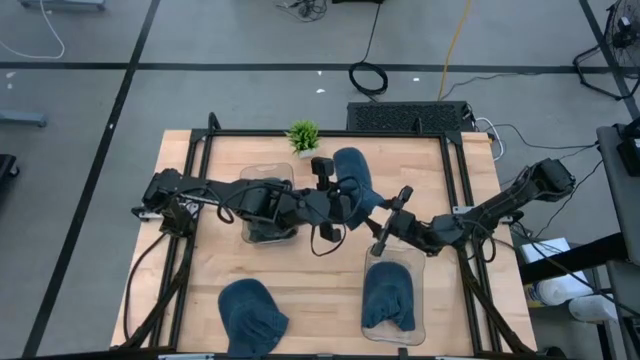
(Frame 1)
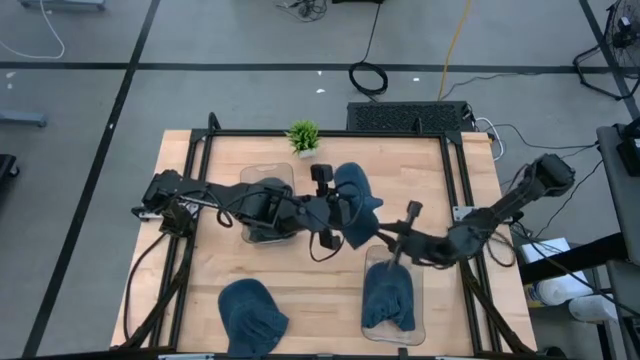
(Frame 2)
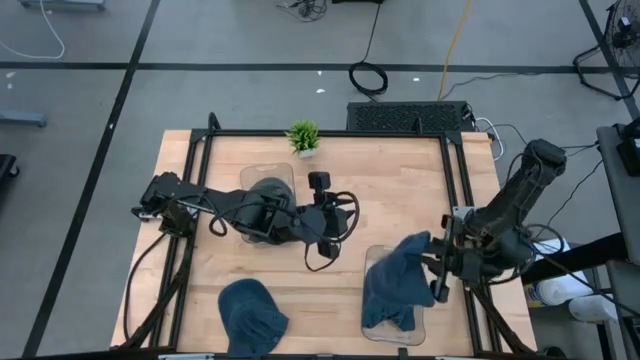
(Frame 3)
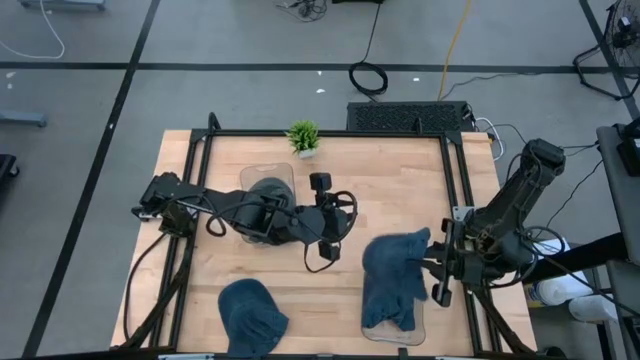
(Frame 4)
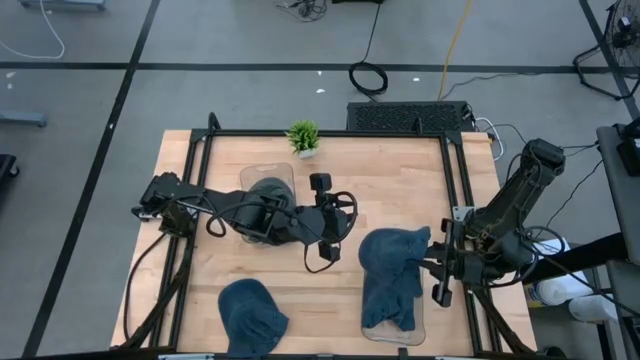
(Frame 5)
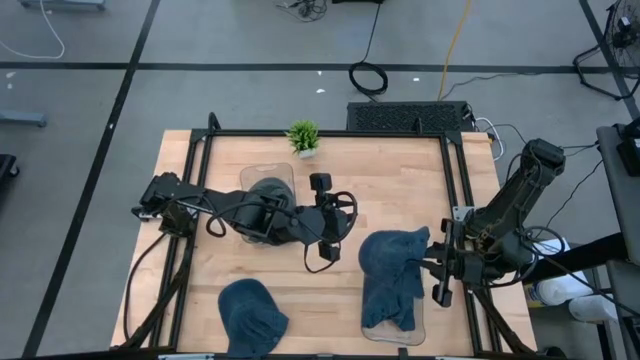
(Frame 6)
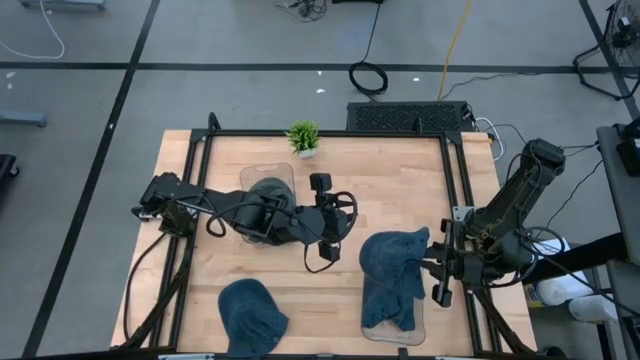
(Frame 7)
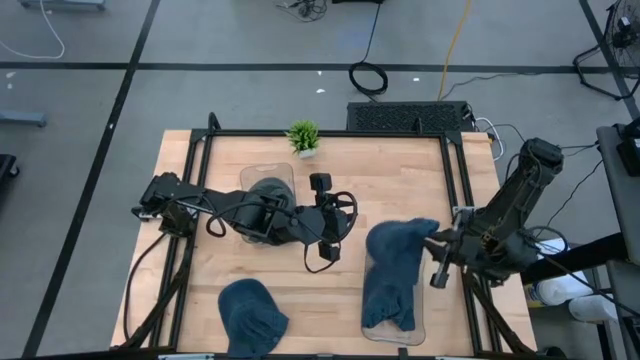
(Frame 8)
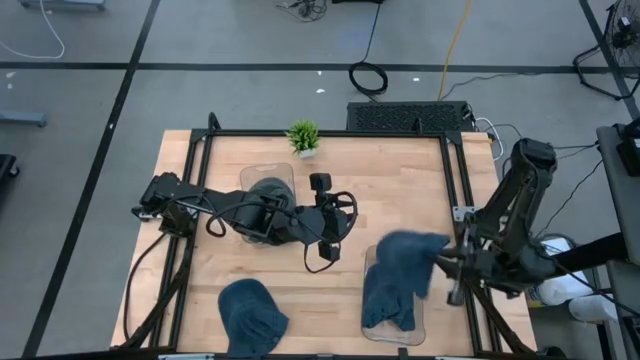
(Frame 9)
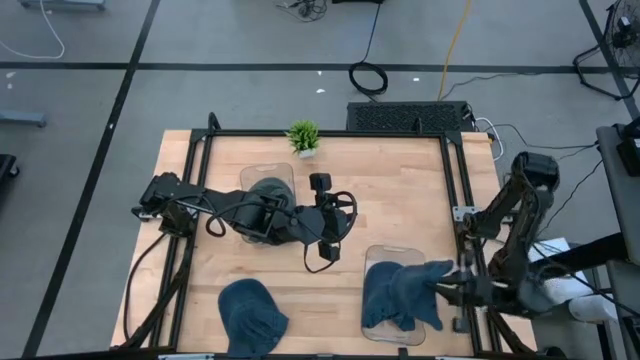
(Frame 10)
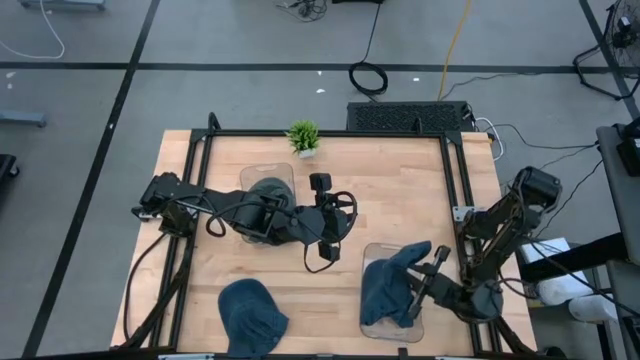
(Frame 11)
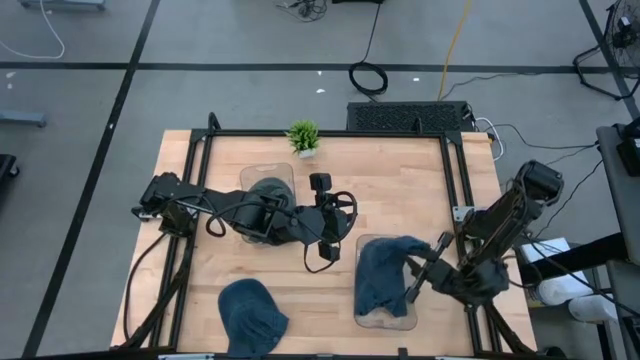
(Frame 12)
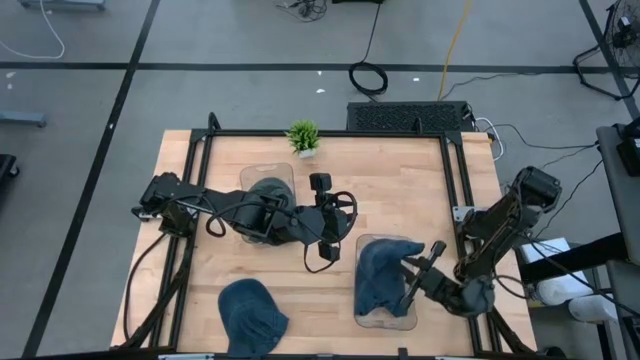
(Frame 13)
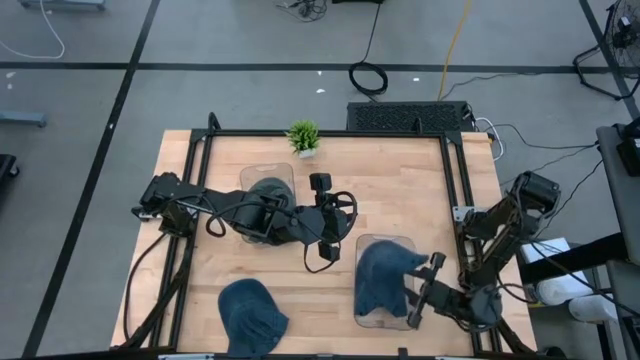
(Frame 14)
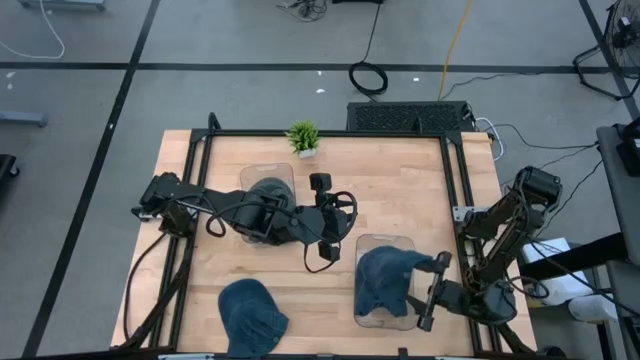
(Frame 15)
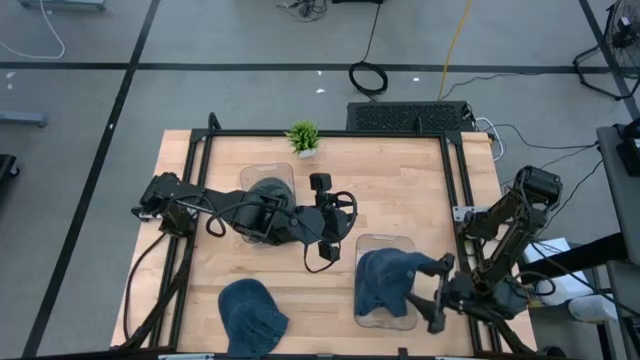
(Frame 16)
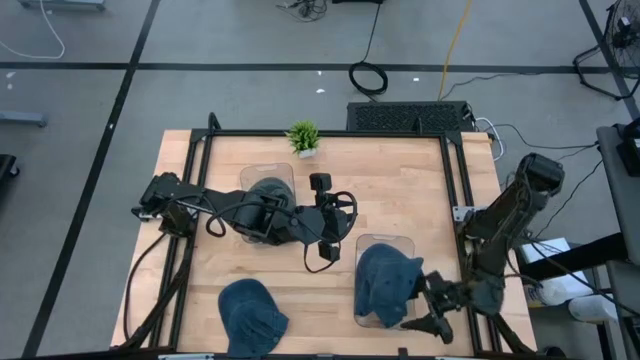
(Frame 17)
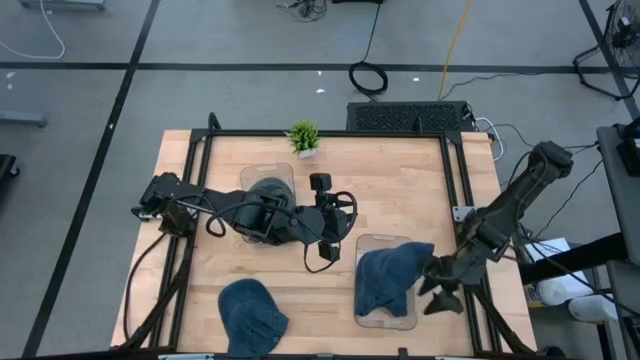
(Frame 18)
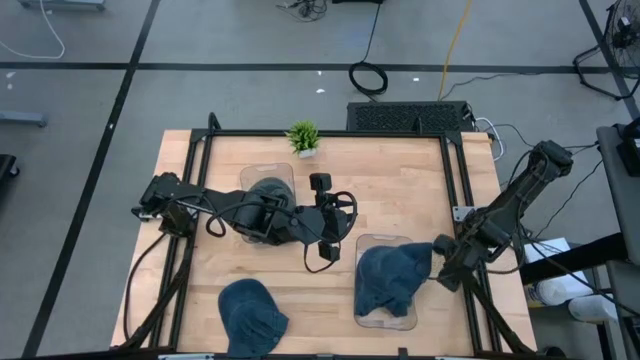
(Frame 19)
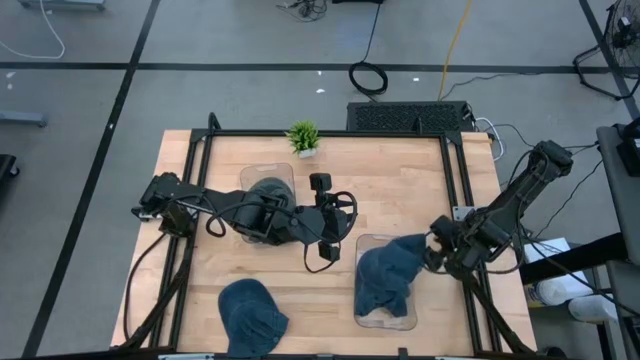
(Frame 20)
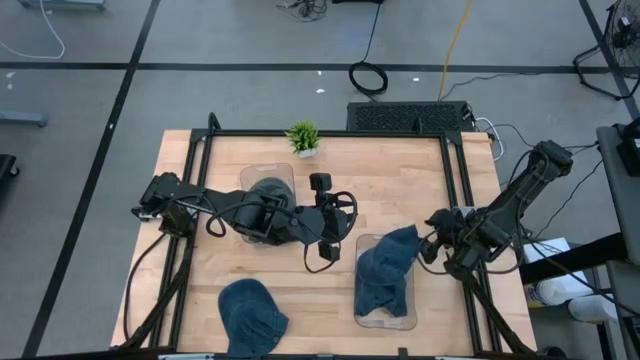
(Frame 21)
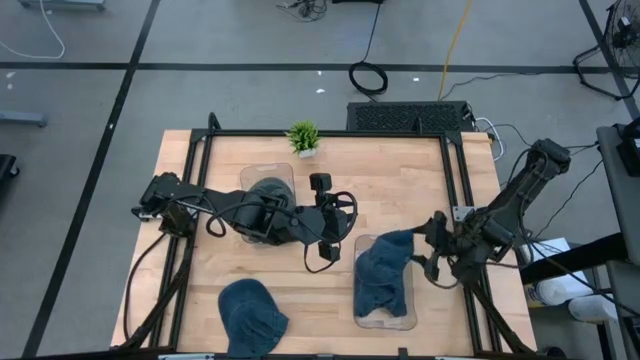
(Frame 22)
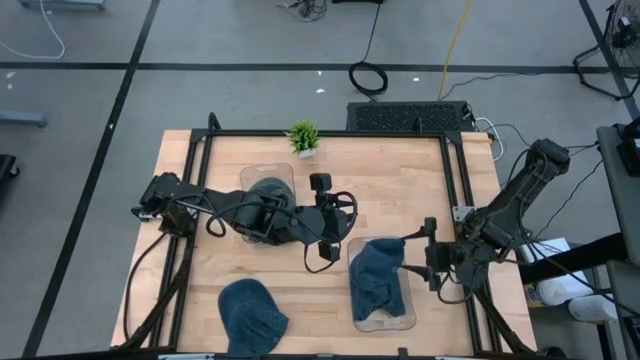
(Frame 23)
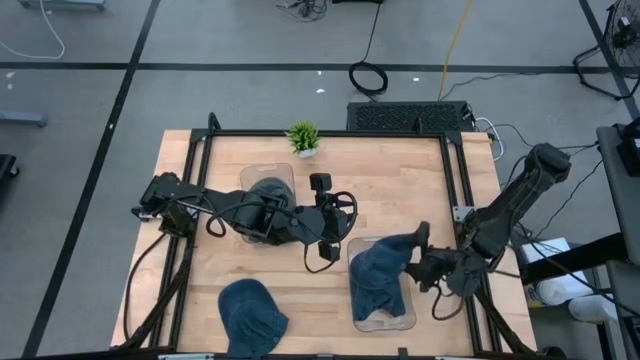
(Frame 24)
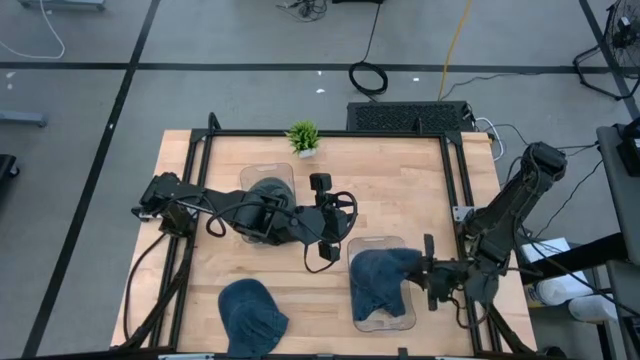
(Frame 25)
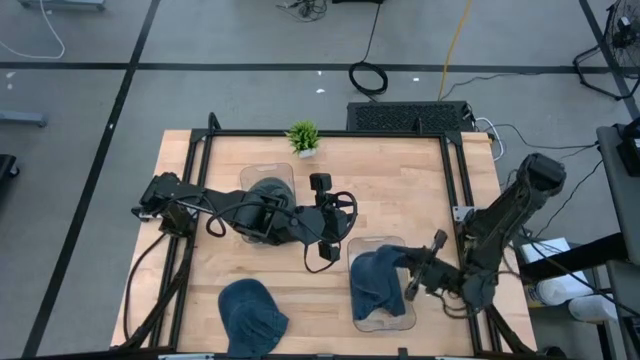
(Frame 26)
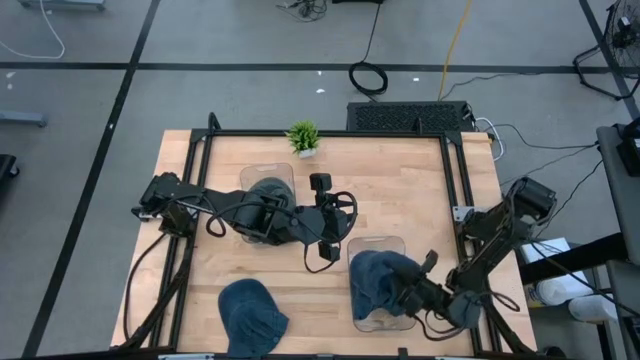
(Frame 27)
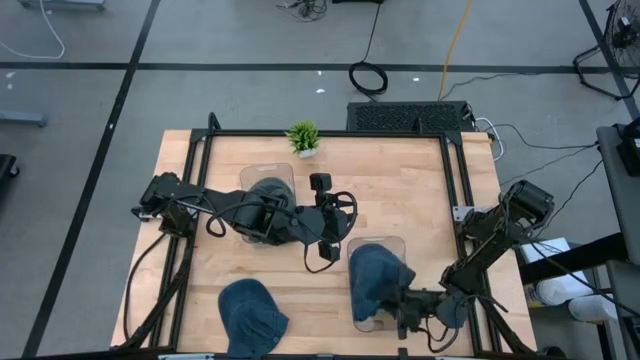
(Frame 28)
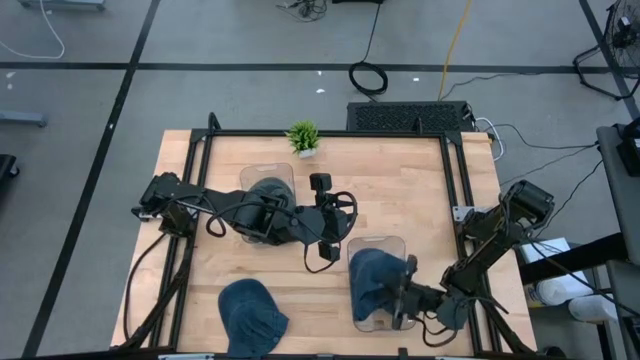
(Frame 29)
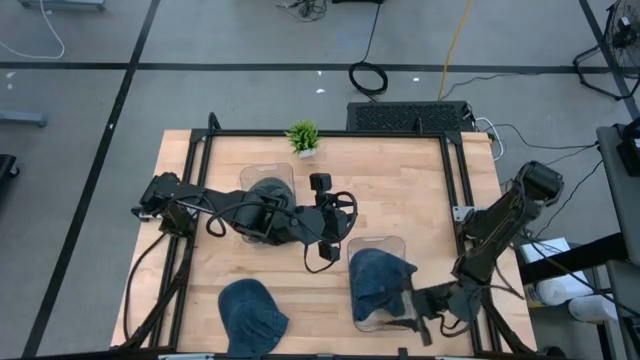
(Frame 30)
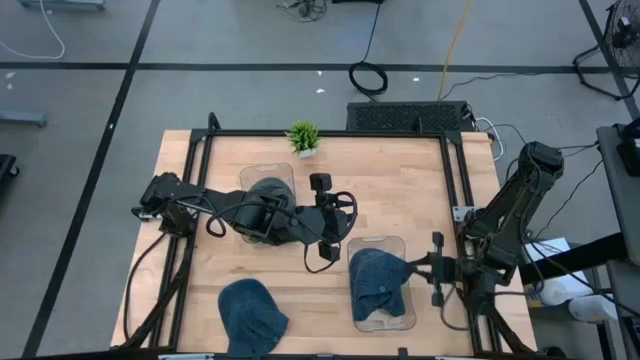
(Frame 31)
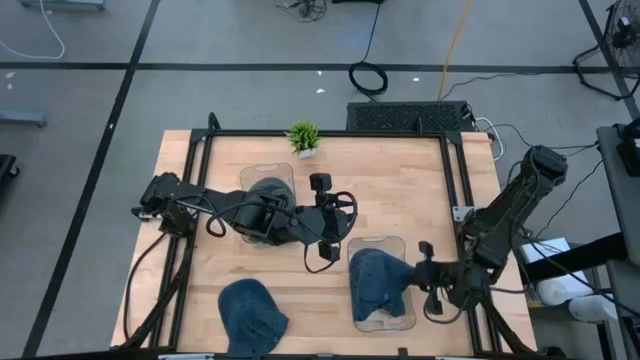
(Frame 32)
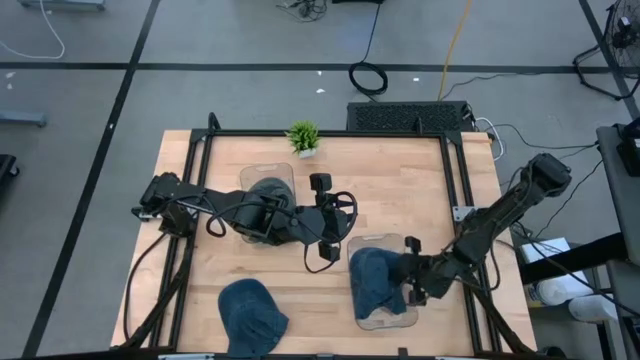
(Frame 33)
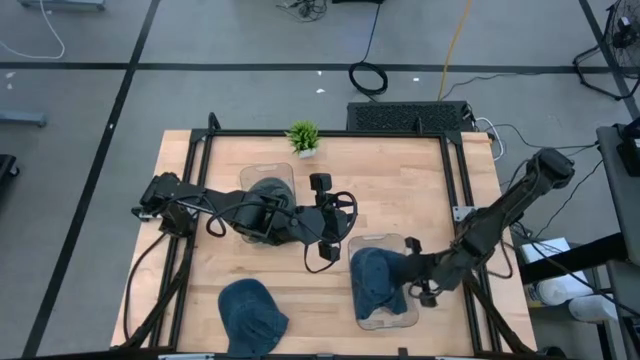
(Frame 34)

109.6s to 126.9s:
Task: Pick & Place hat
Put the blue cap into the bottom transparent bin

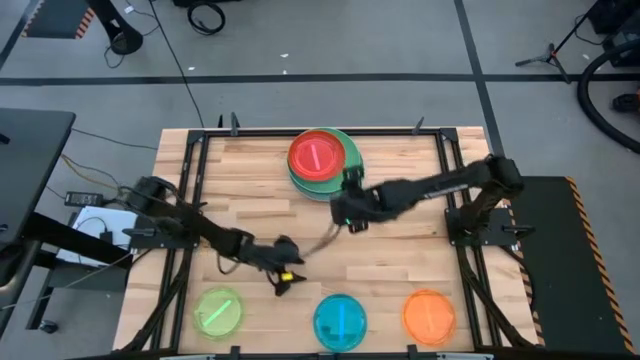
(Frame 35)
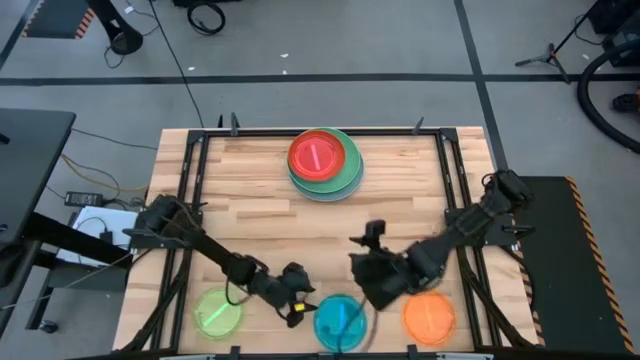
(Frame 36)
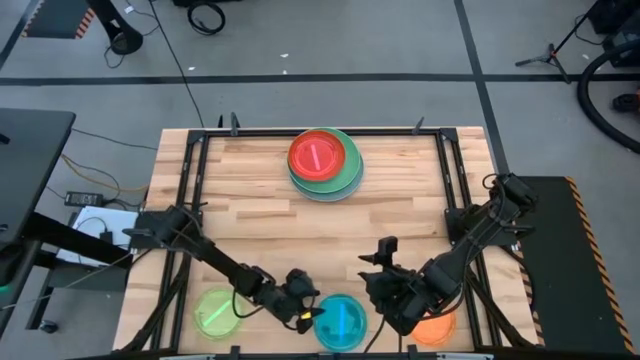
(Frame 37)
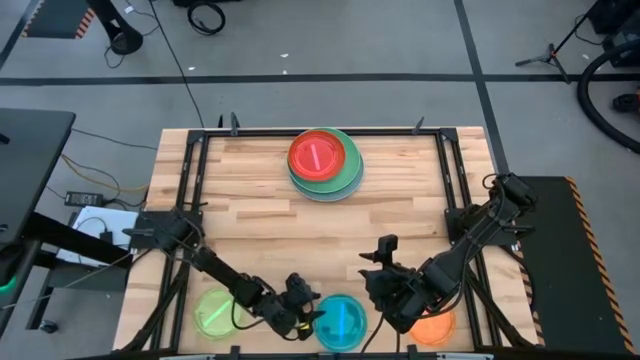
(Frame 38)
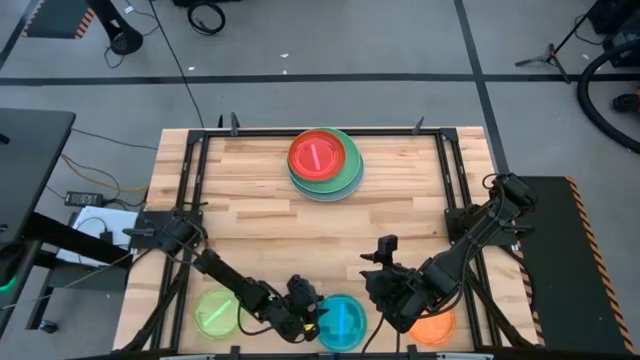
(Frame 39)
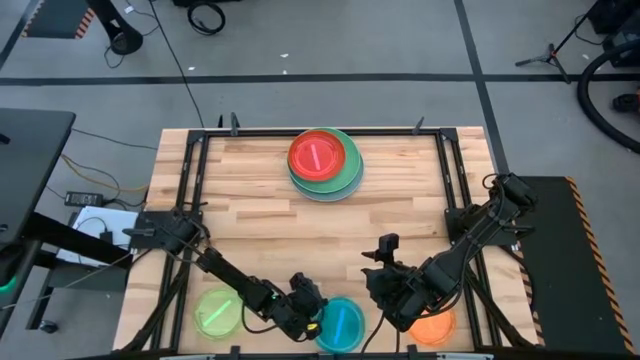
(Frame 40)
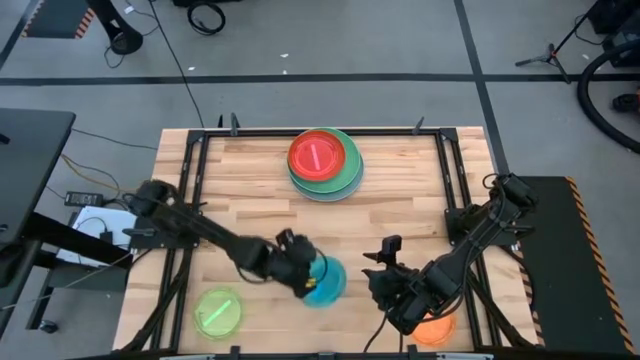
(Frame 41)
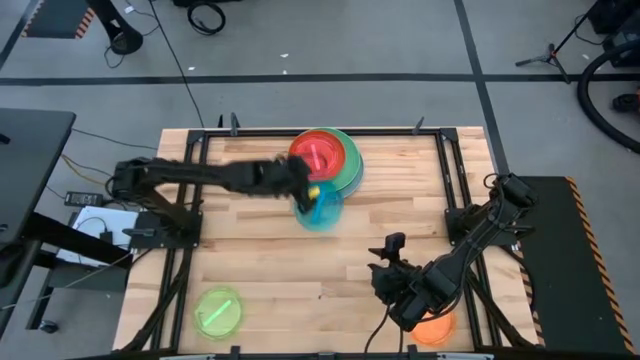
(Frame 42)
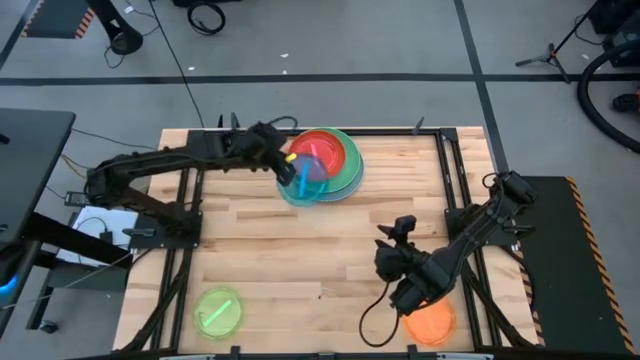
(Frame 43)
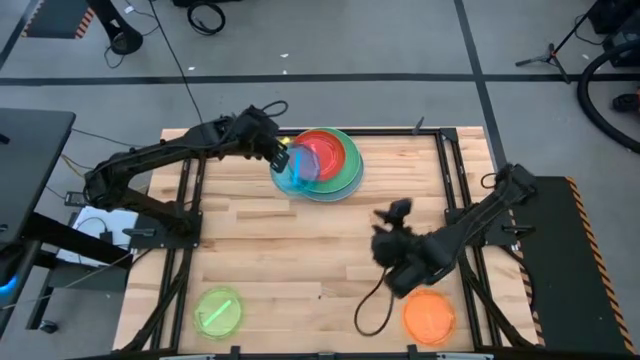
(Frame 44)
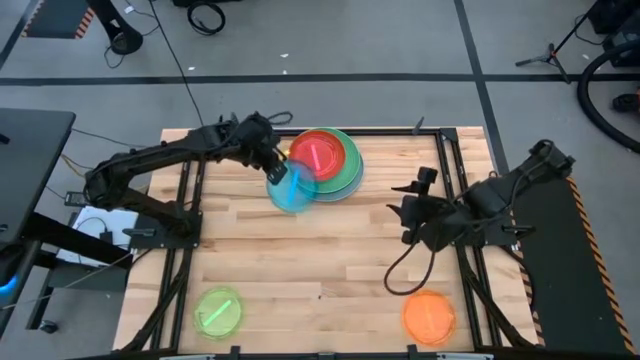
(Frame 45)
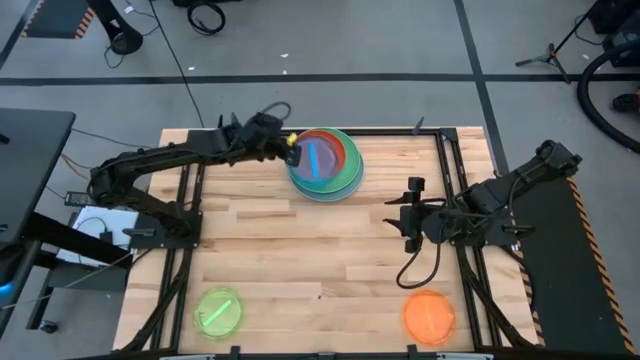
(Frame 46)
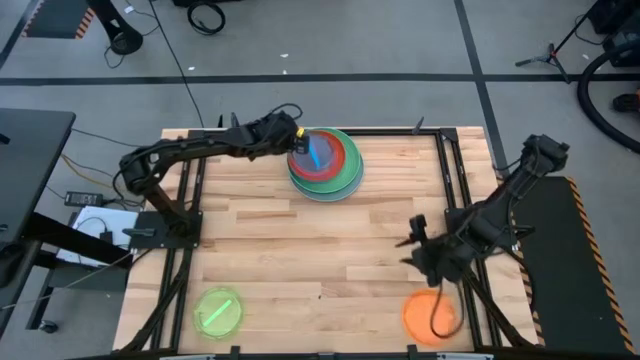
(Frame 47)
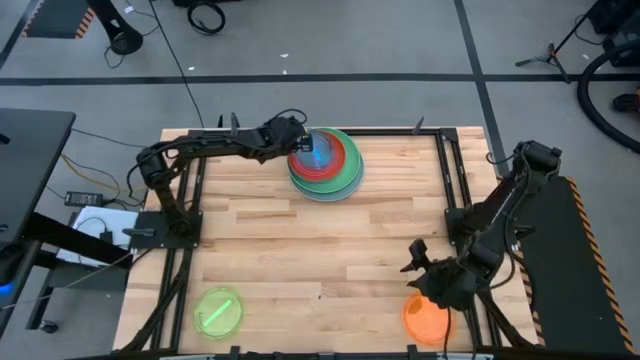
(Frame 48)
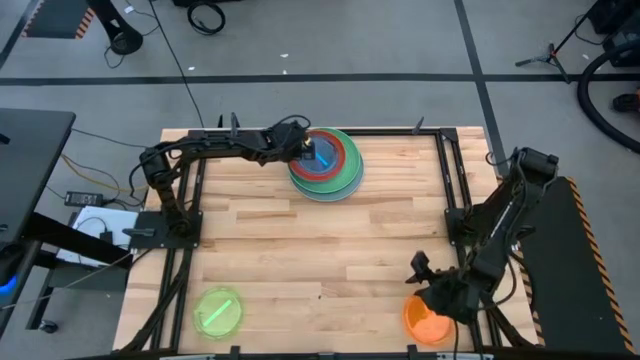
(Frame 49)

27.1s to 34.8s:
Task: Stack plastic plates
Stack the blue transparent plate on top of the pink transparent plate
